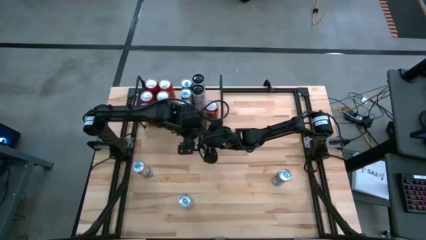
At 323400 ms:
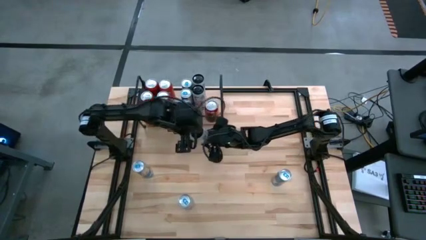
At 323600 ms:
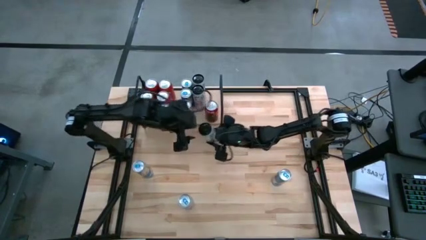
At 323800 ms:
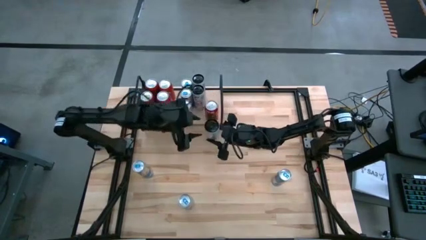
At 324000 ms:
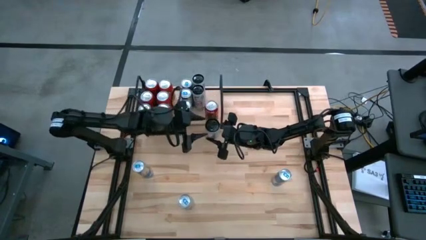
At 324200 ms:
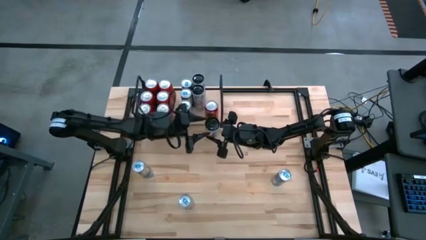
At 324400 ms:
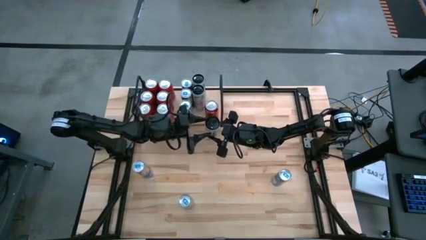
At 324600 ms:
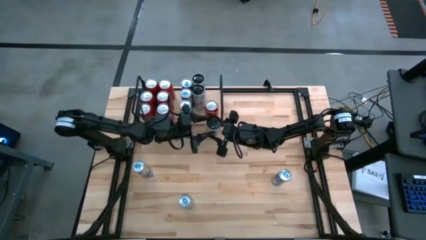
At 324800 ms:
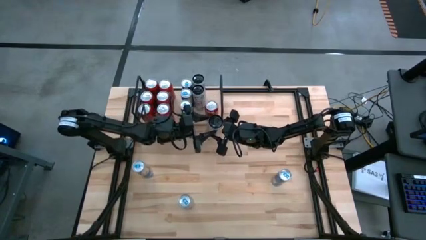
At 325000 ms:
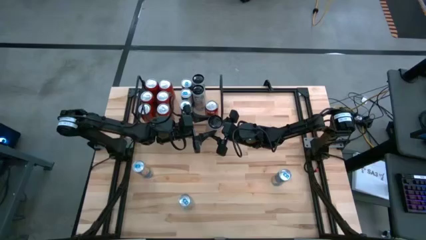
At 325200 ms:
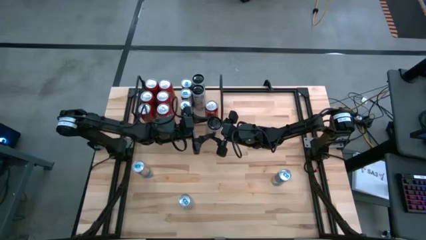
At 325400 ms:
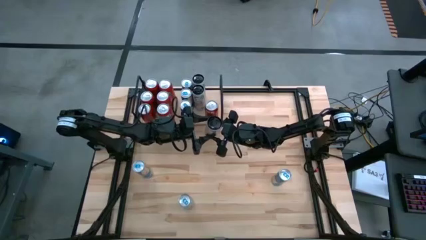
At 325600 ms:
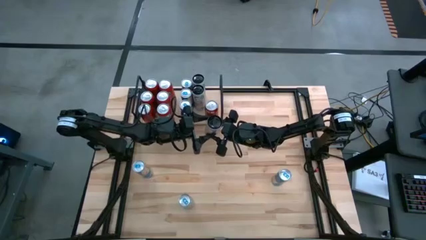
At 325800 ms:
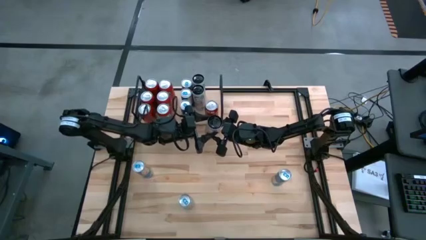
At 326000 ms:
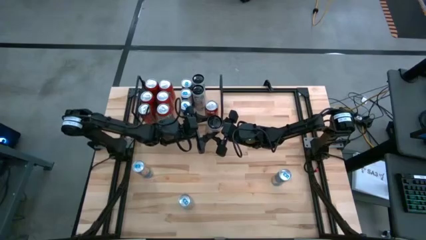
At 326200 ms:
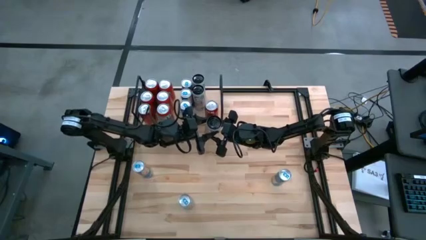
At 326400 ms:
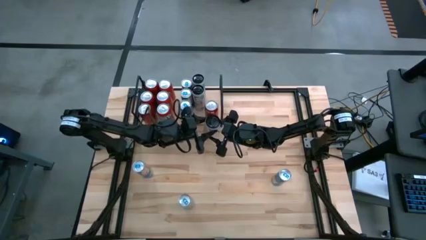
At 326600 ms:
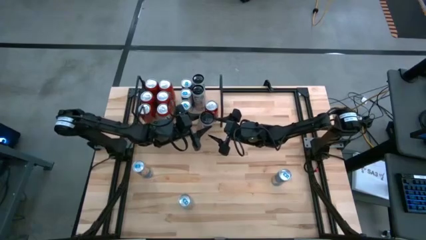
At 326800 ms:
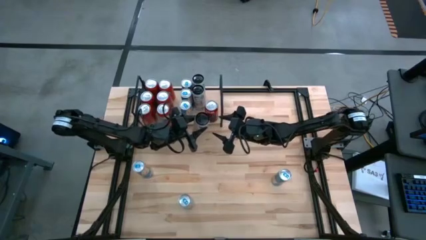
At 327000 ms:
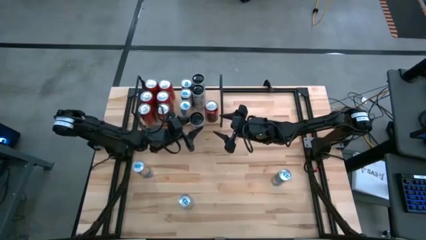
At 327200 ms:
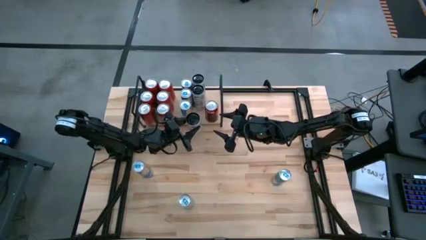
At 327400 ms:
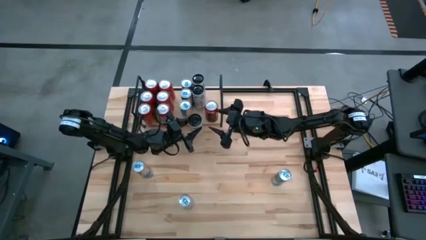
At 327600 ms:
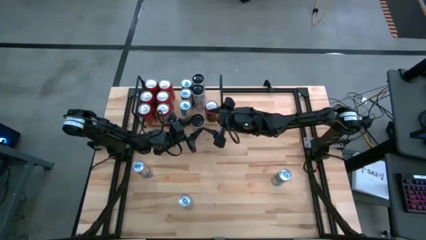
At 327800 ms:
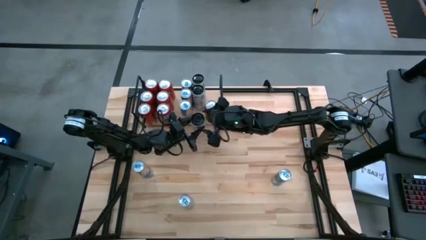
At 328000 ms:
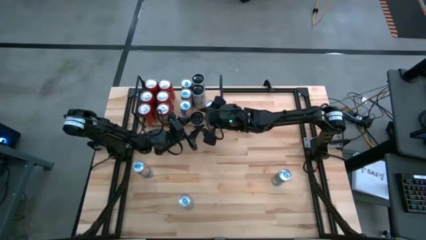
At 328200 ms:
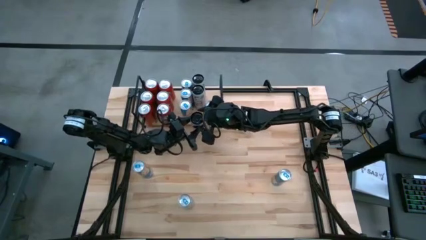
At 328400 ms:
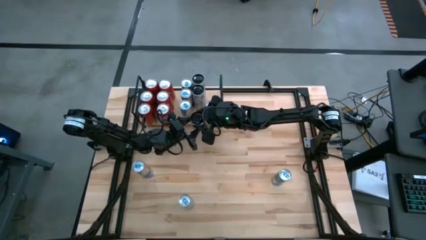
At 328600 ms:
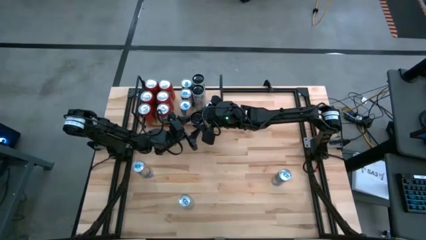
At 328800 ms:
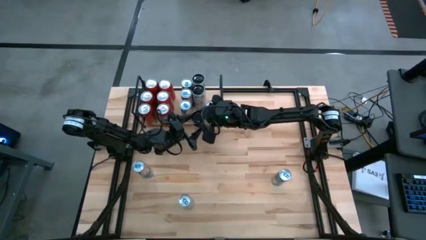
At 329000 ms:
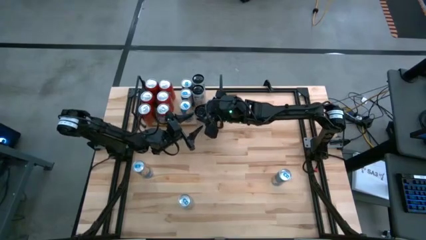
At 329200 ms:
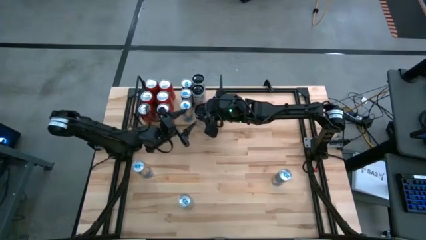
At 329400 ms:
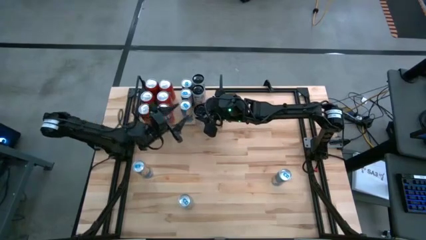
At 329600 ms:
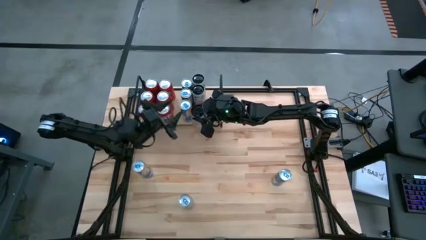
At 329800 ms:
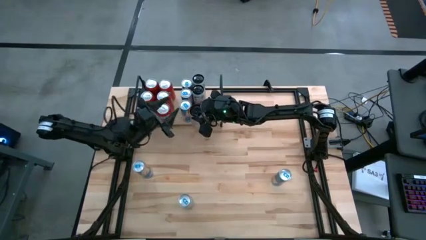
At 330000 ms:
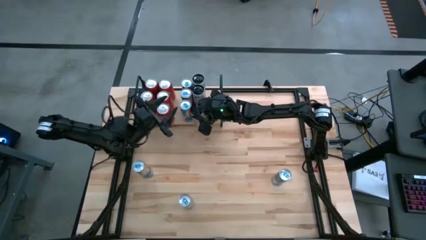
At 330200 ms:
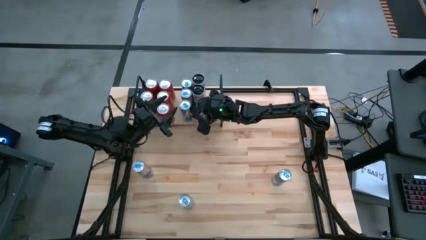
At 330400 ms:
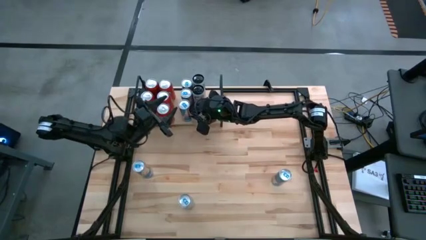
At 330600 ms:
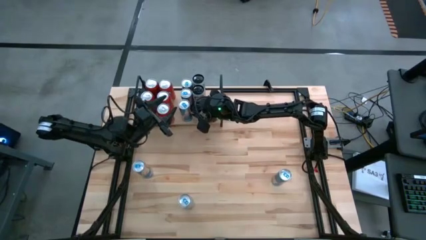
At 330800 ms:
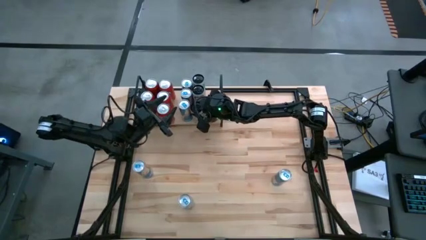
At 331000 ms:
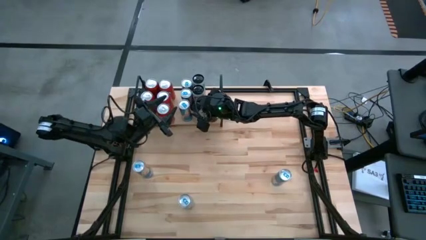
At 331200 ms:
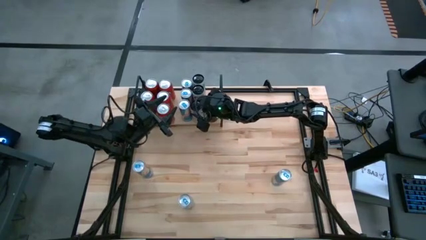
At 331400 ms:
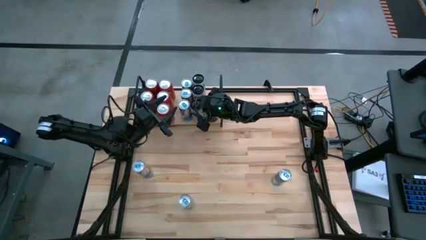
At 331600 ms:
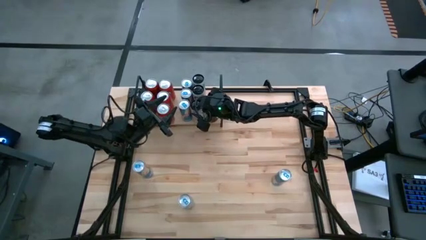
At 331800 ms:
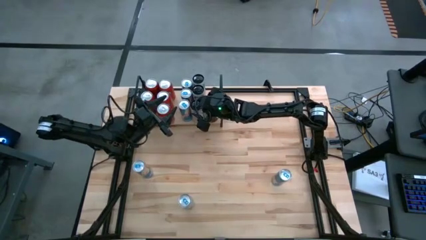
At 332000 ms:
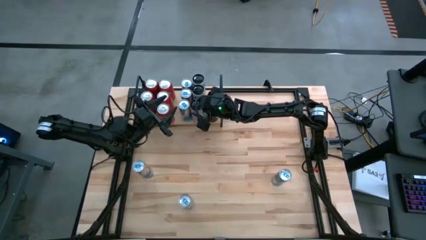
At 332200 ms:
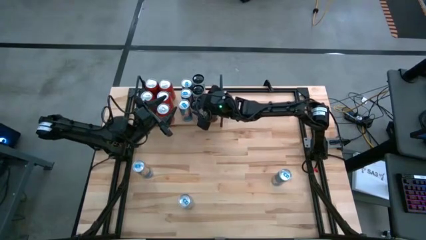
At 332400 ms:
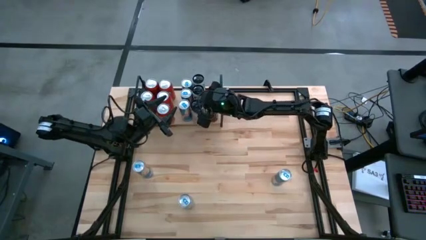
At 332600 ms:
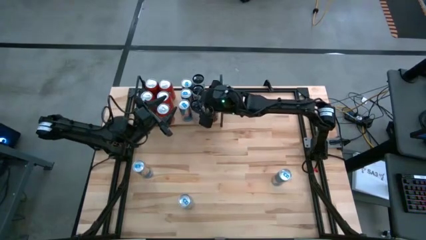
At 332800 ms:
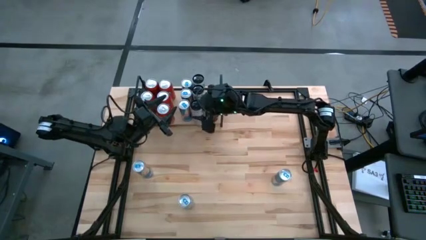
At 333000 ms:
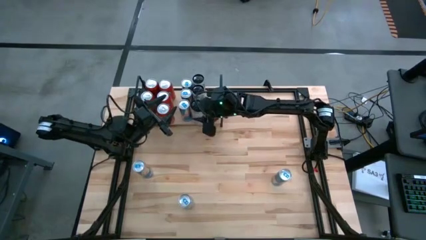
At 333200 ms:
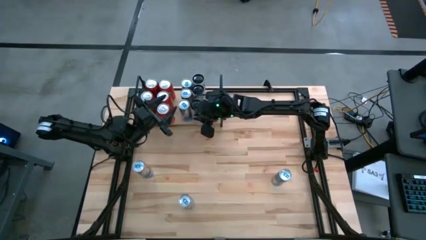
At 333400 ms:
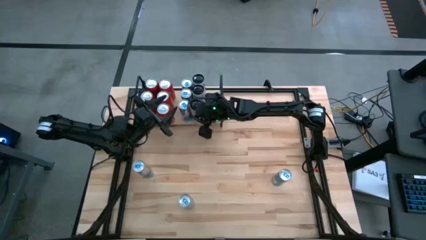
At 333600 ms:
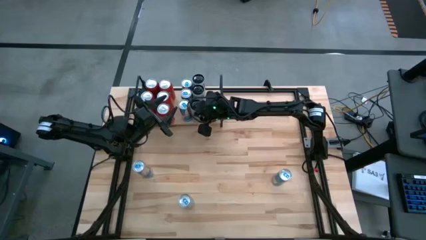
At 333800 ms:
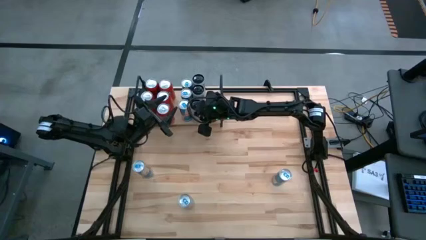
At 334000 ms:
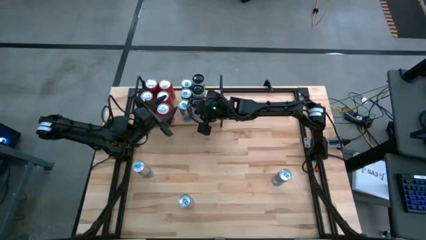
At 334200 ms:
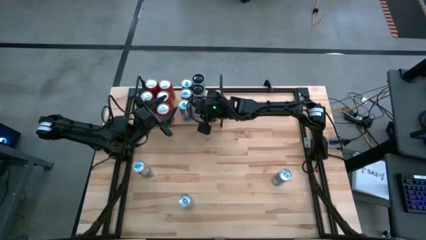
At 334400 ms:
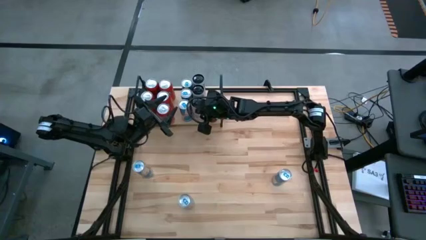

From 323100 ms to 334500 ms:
Task: Place canned beverage on shelf
Put the white and pink soda can on the shelf aligned with the other white and pink soda can

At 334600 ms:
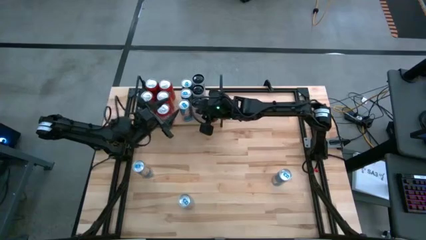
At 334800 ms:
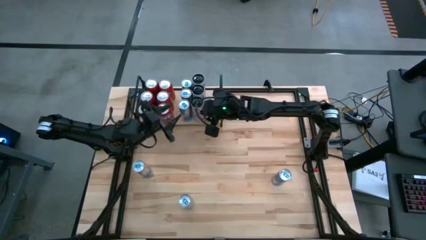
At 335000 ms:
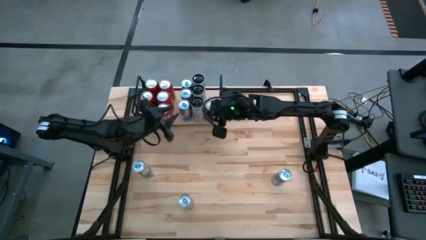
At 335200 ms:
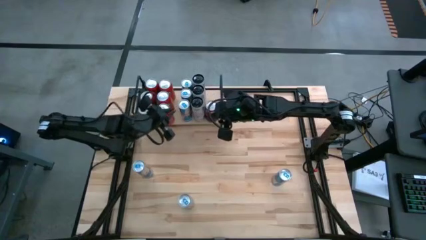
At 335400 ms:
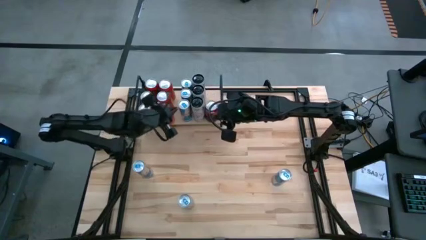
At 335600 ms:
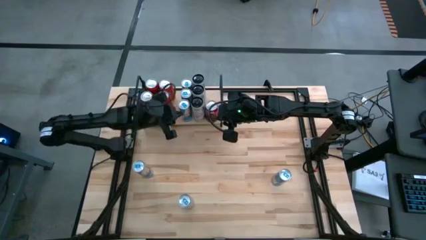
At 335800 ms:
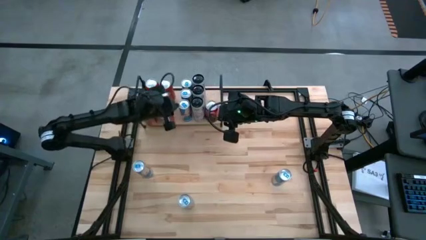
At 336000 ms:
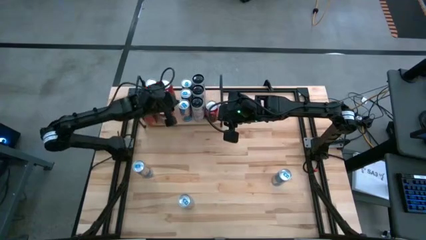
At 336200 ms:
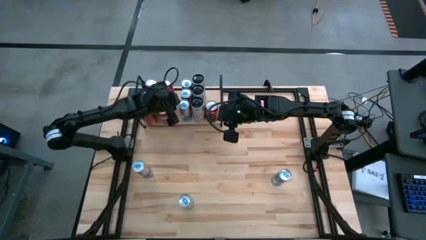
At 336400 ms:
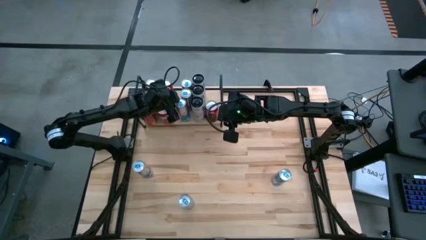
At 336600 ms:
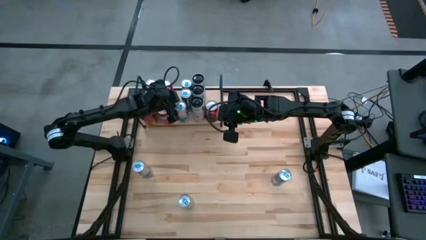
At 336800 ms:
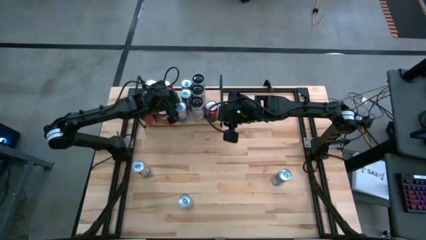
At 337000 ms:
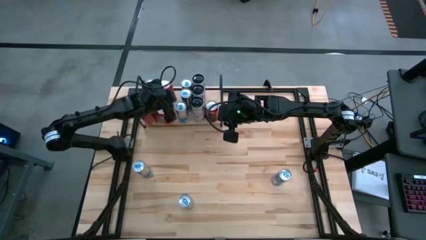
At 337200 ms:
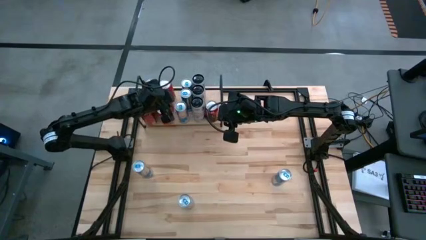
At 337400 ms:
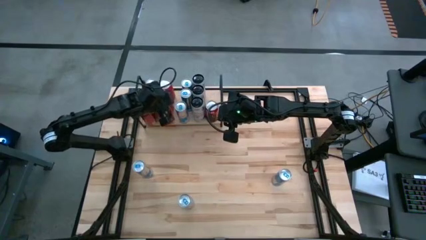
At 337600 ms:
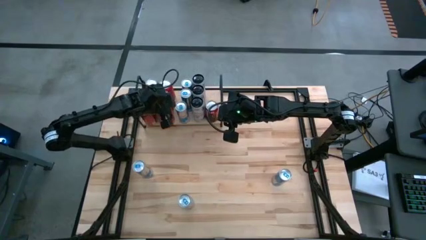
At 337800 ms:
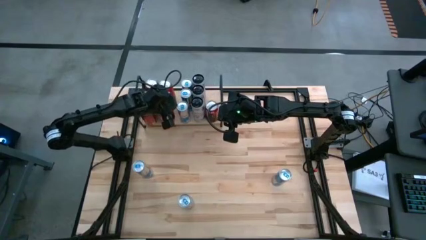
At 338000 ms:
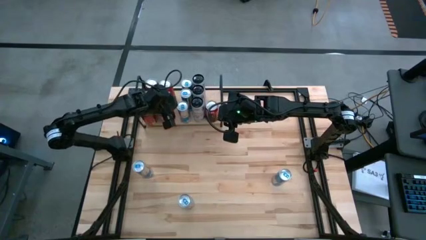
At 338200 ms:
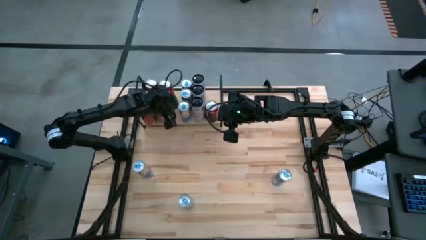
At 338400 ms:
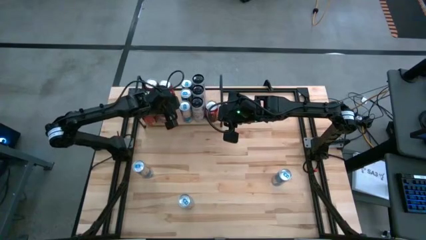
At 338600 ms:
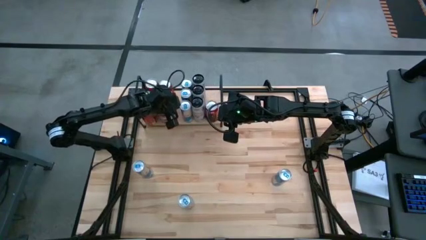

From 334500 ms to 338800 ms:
Adjust the blue soda can on the shelf
